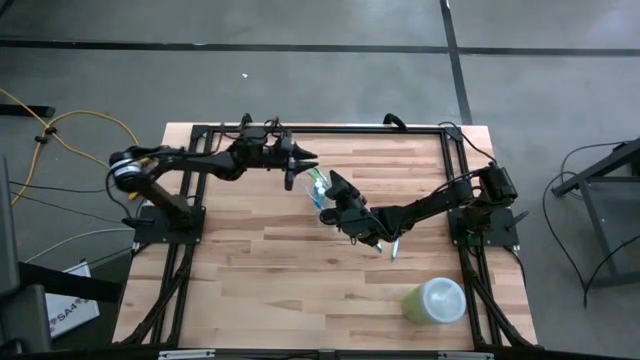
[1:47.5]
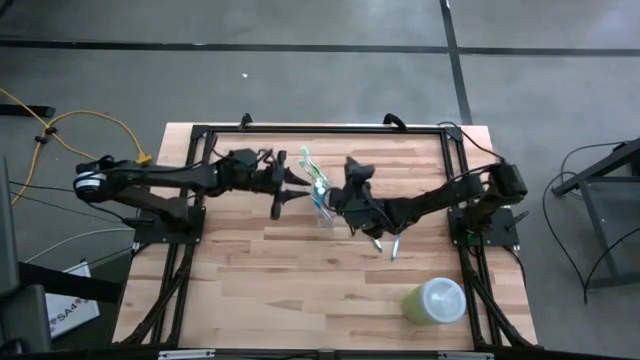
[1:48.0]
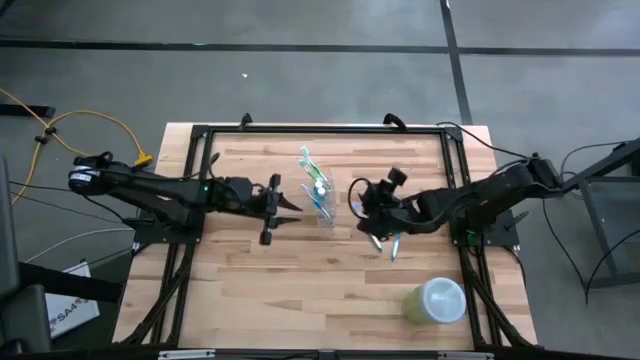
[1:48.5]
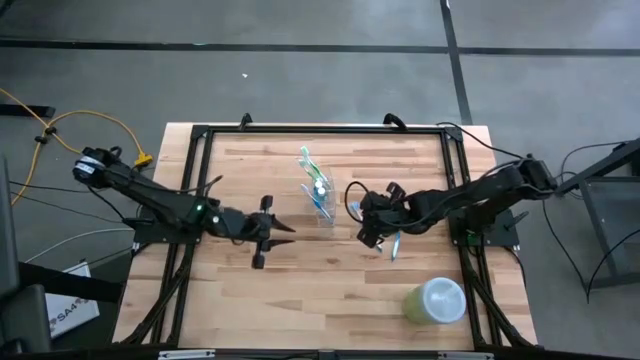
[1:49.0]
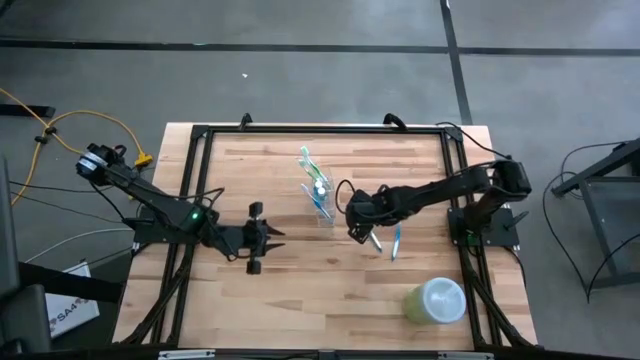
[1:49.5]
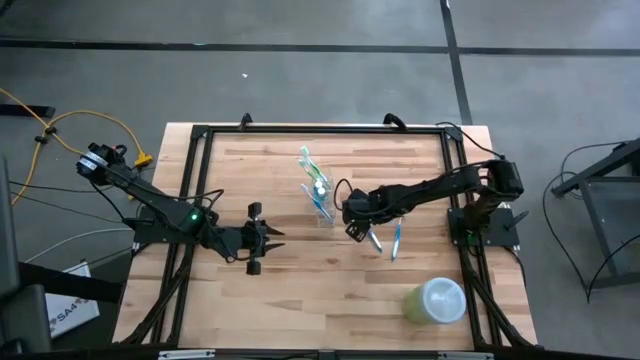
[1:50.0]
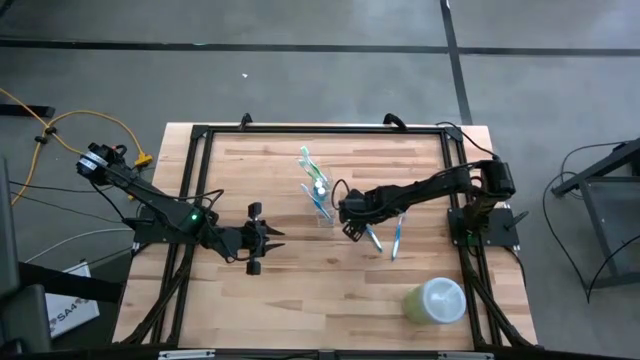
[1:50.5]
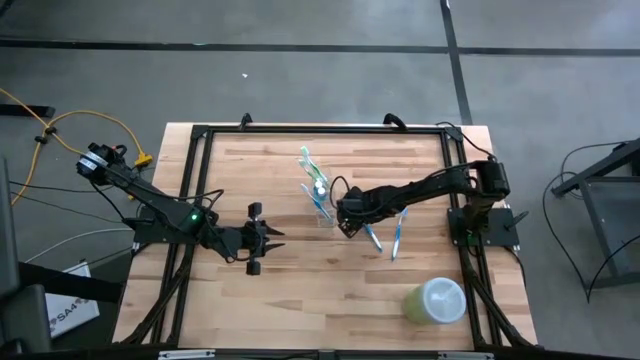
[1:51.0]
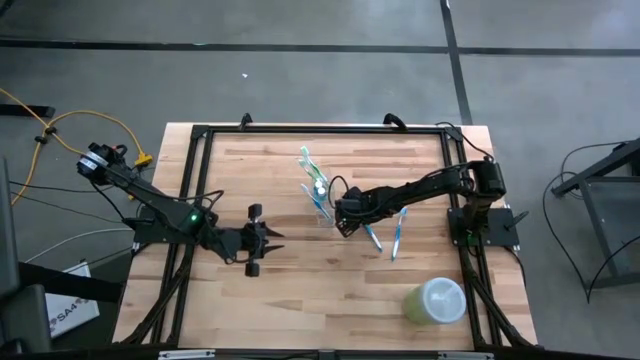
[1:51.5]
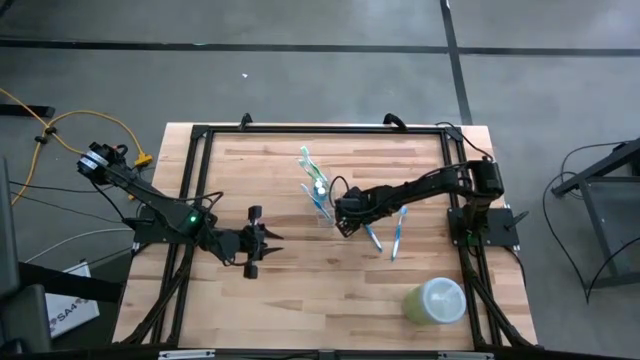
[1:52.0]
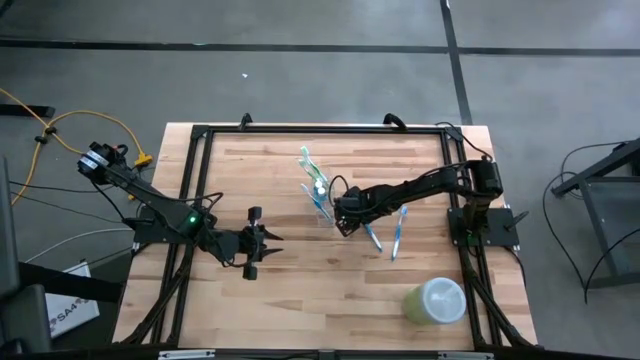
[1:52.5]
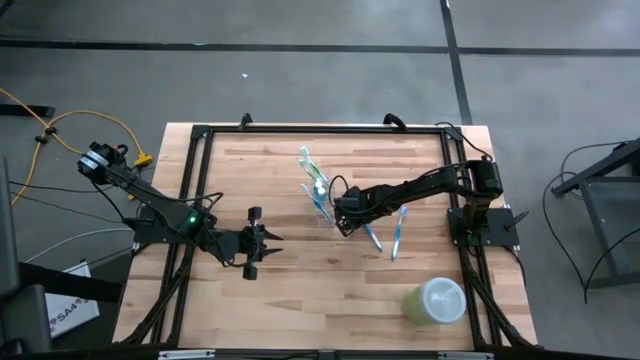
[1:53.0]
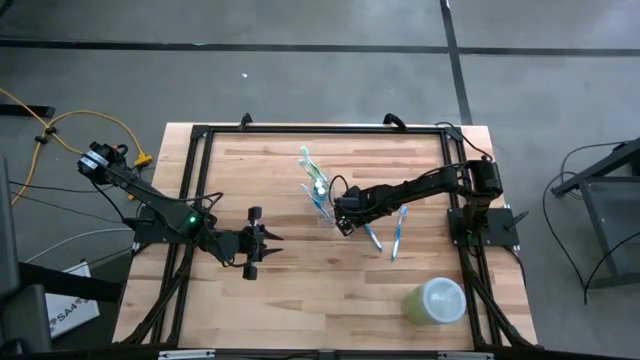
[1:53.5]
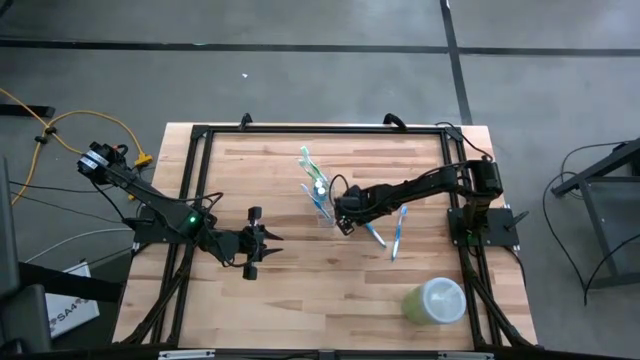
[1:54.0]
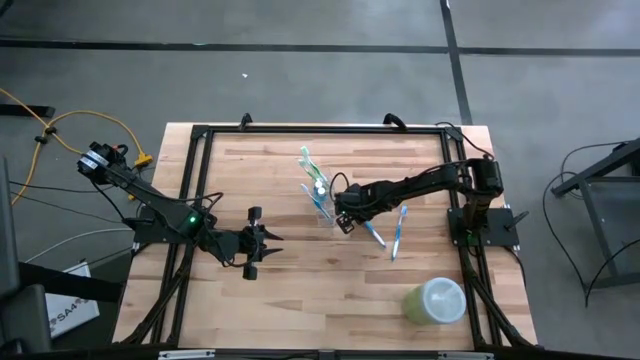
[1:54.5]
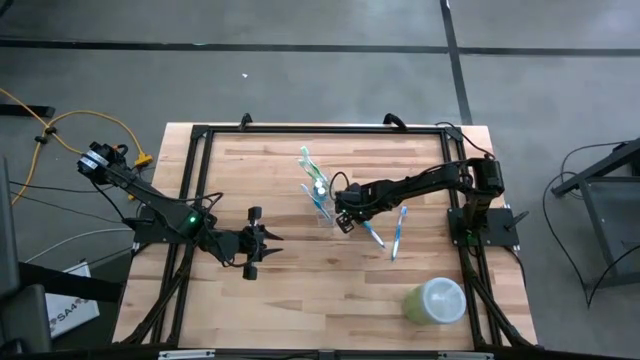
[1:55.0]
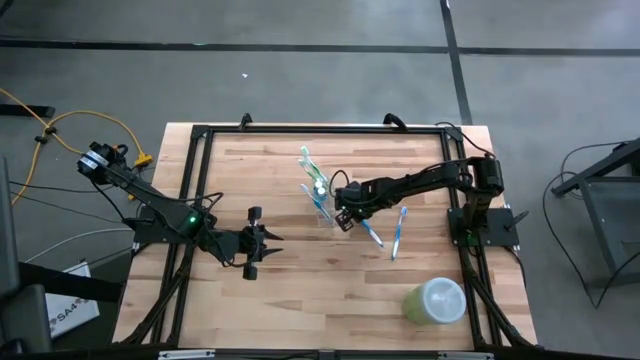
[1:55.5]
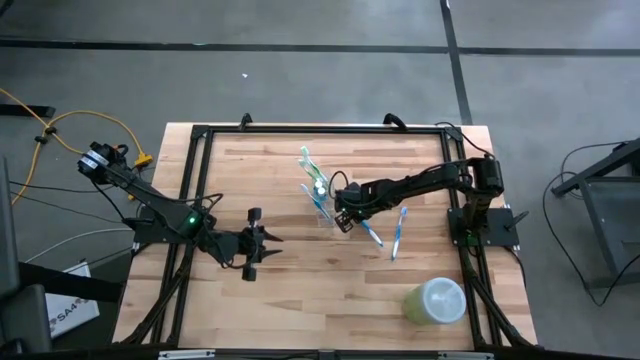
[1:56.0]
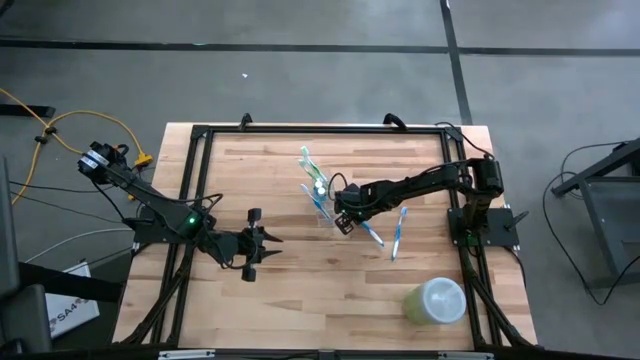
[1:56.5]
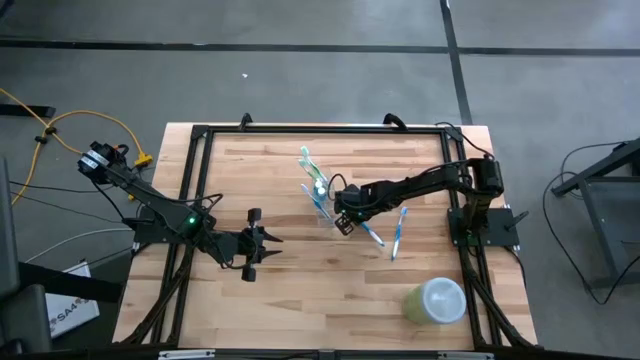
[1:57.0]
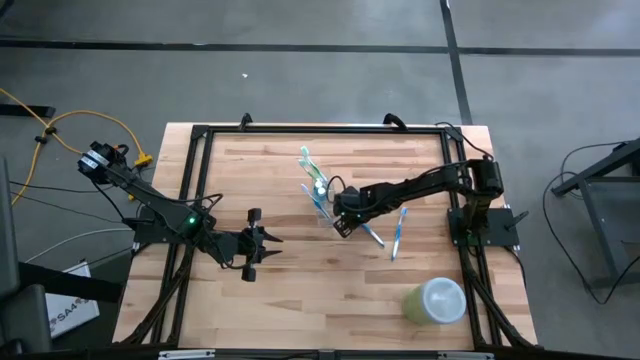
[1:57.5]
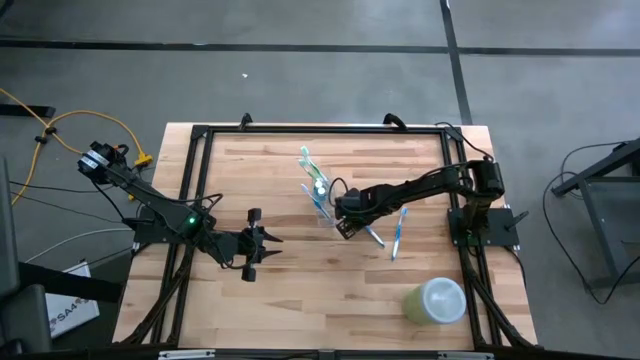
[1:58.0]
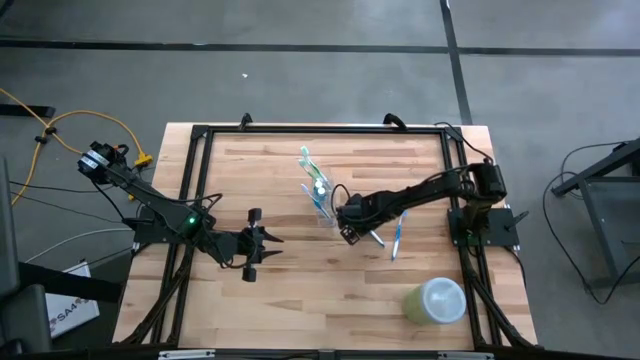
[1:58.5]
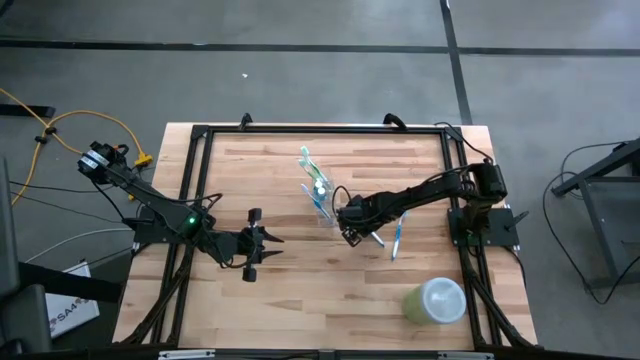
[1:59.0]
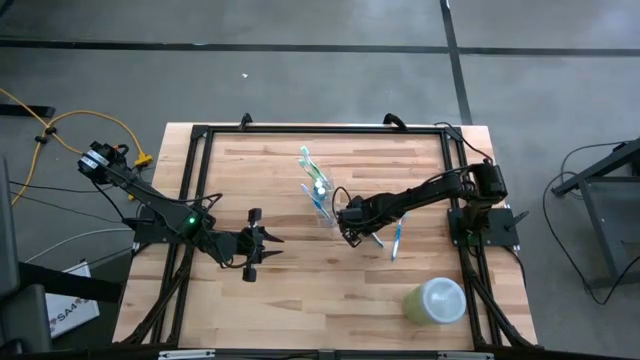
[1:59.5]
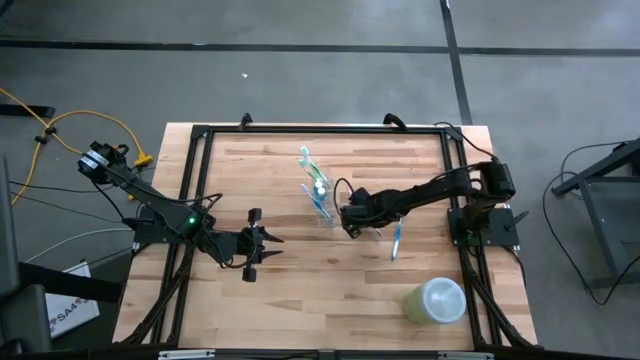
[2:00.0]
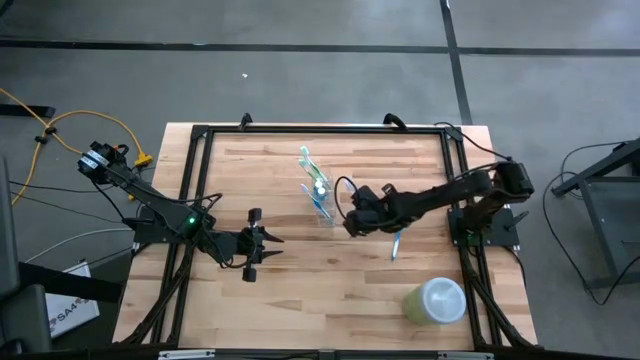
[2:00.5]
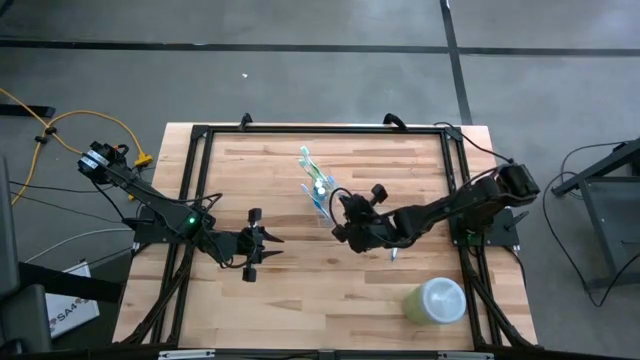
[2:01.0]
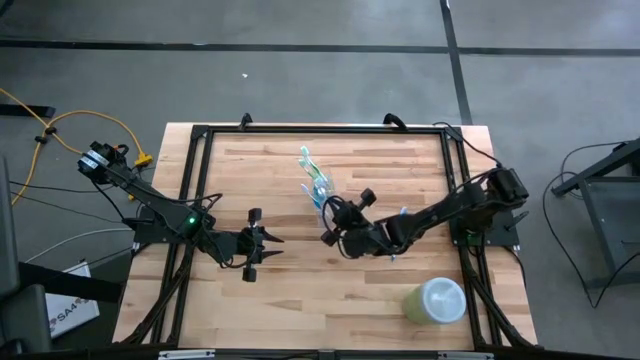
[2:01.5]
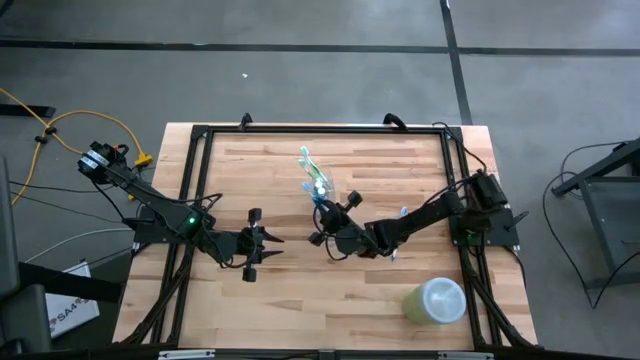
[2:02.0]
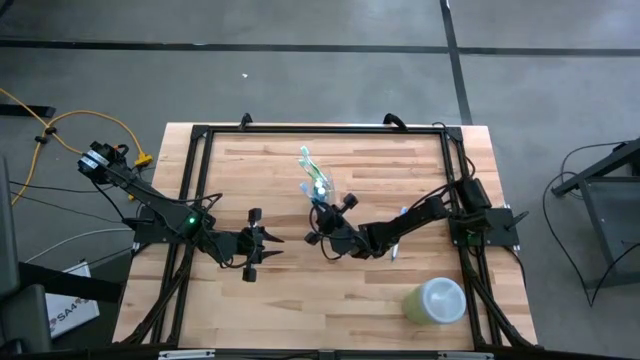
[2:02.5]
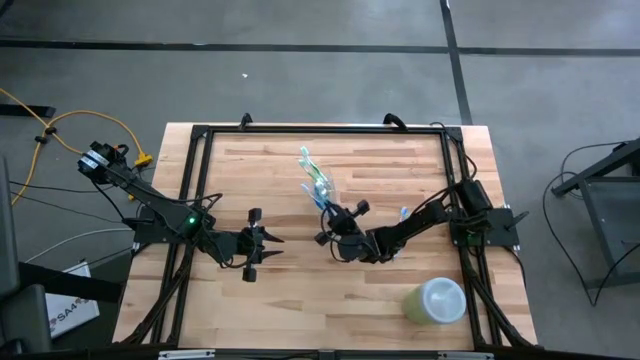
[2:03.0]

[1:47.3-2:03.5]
Task: Pick & Place toothbrushing station
Put the left blue toothbrush into the transparent organizer

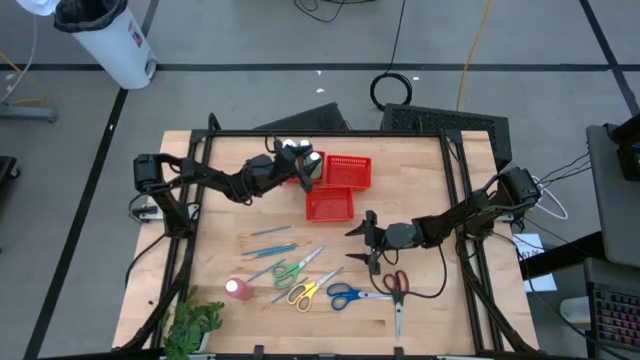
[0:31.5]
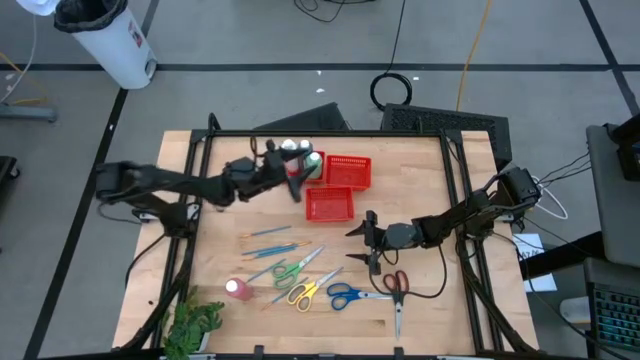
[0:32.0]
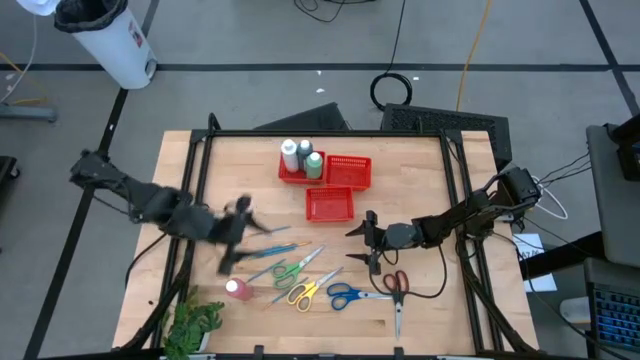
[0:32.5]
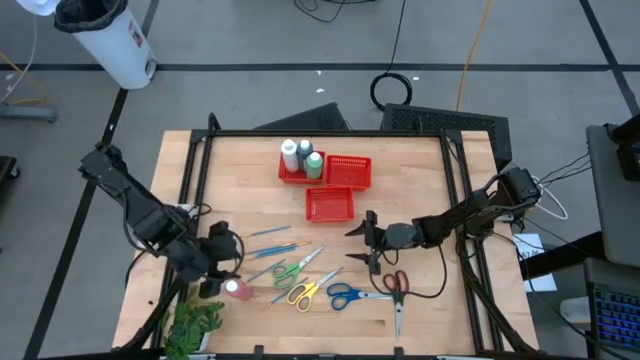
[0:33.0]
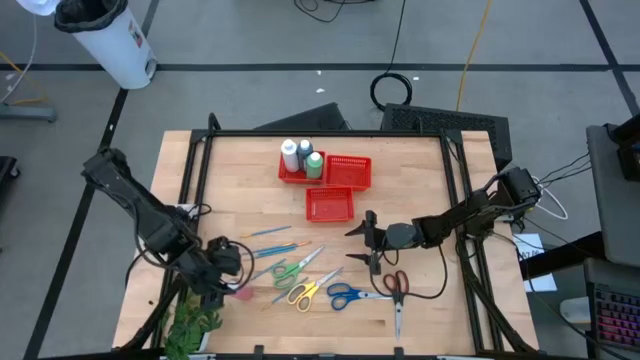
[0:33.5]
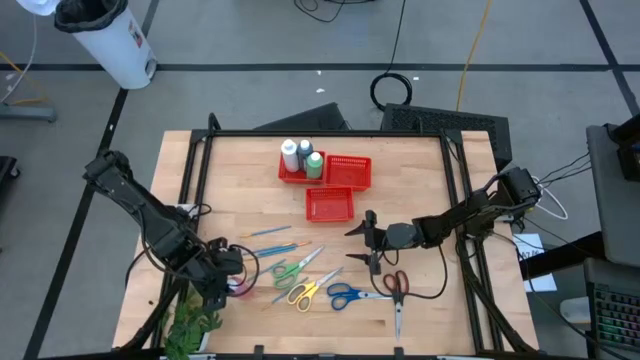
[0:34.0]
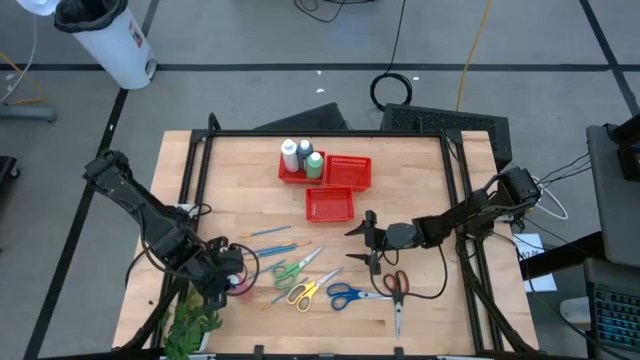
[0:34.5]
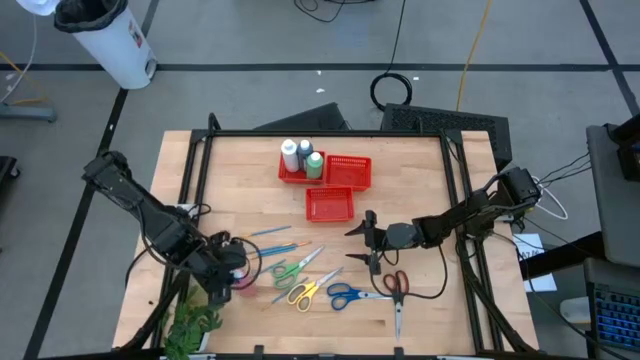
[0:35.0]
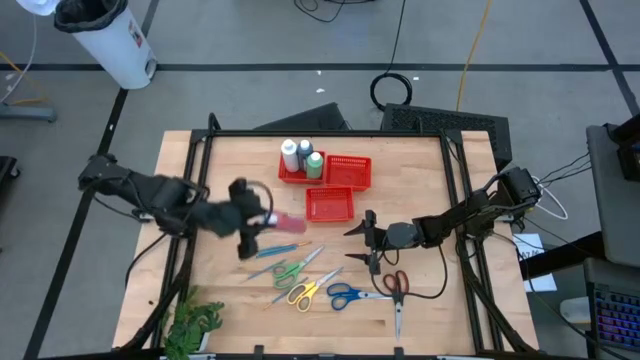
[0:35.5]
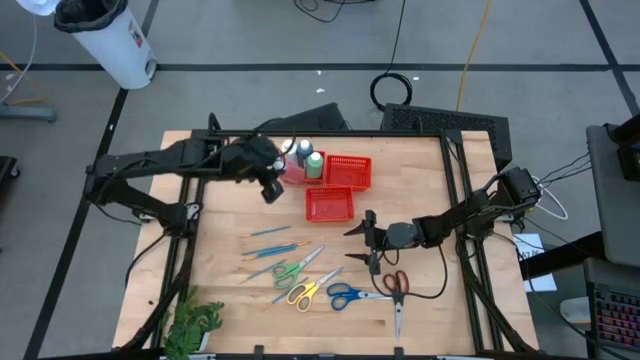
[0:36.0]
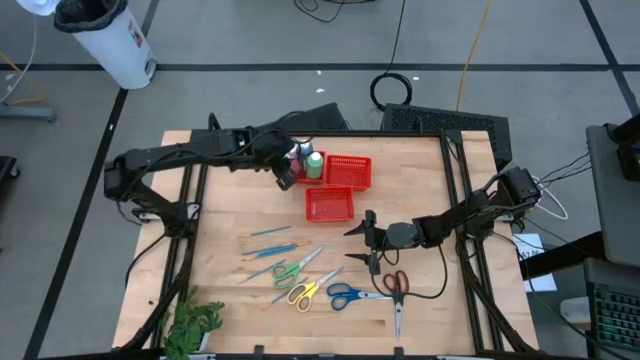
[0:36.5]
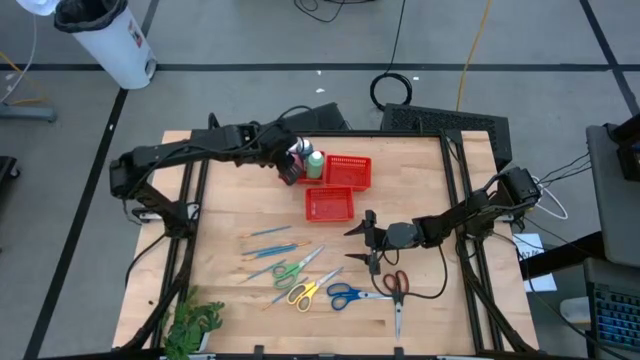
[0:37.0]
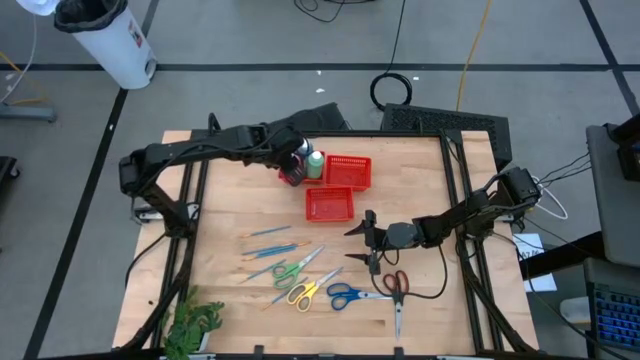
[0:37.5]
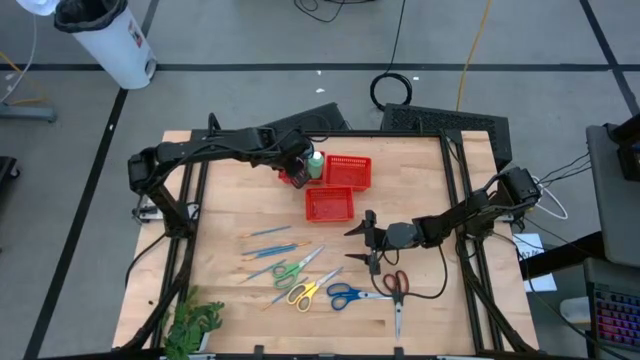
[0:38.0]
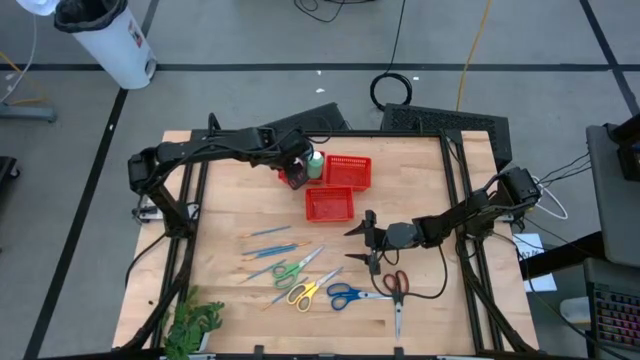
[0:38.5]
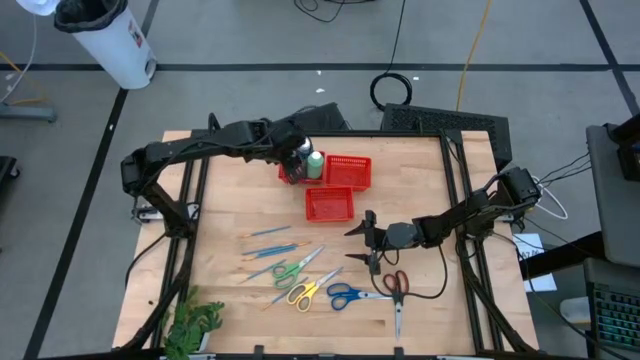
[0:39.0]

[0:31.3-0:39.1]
Task: Pick & Place Paint Supplies
Put the pink paint bottle into the top left red bin
